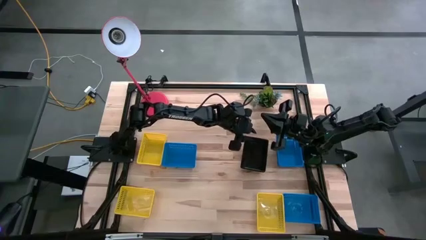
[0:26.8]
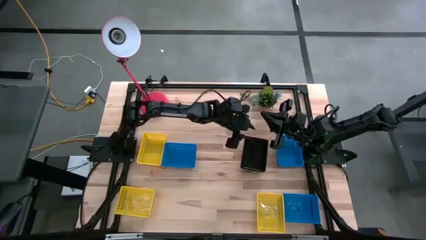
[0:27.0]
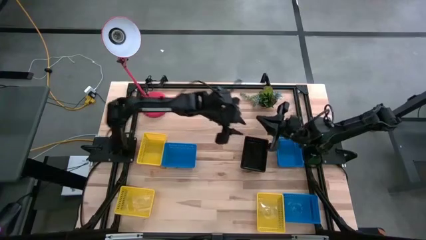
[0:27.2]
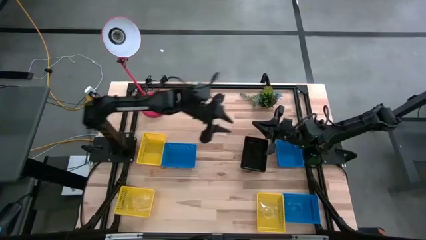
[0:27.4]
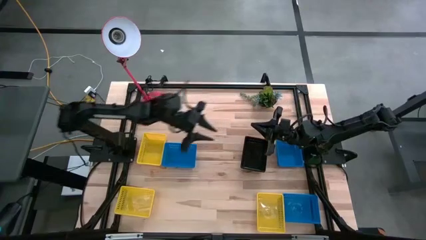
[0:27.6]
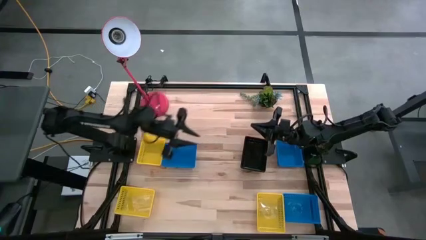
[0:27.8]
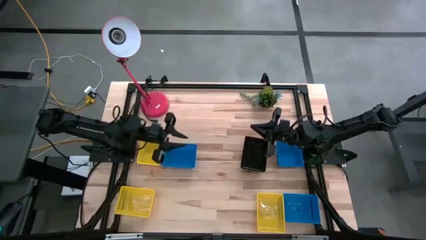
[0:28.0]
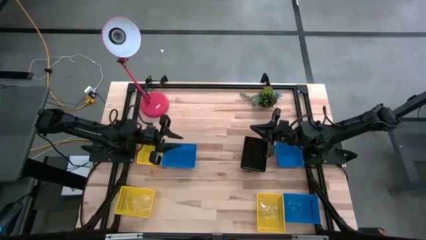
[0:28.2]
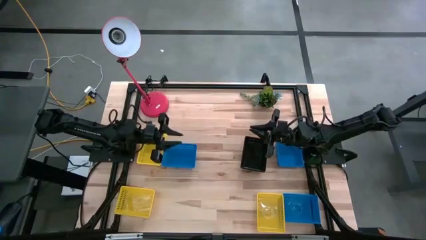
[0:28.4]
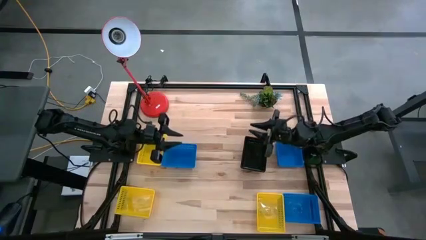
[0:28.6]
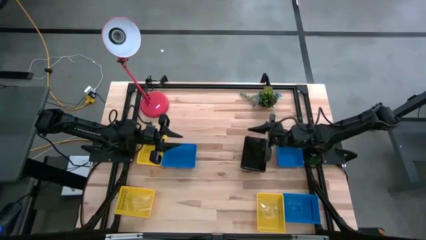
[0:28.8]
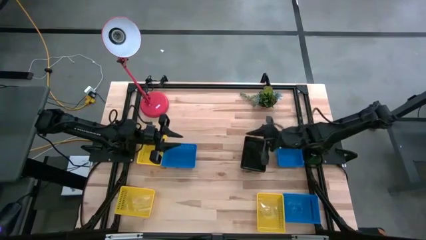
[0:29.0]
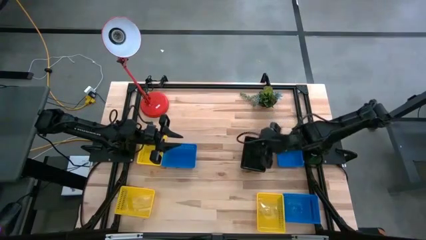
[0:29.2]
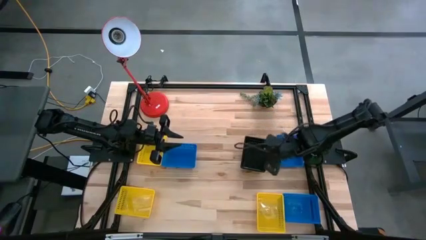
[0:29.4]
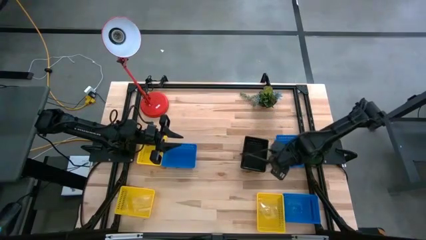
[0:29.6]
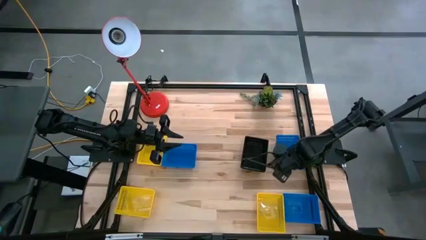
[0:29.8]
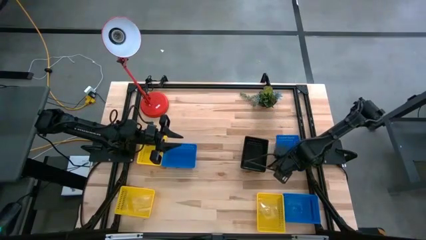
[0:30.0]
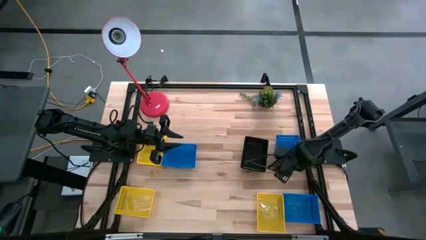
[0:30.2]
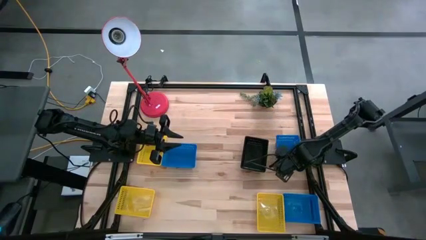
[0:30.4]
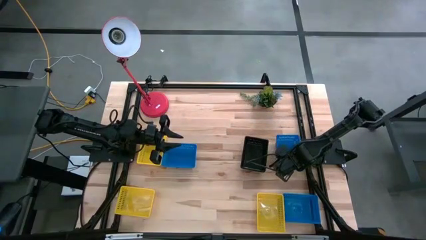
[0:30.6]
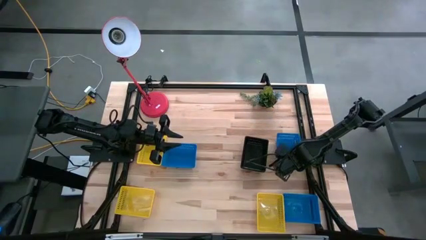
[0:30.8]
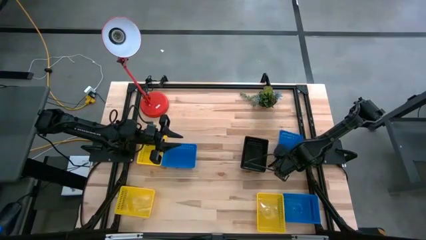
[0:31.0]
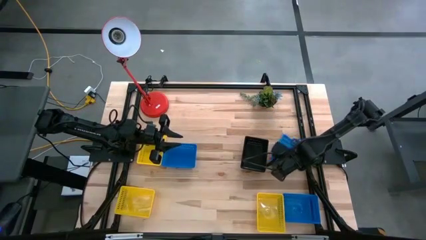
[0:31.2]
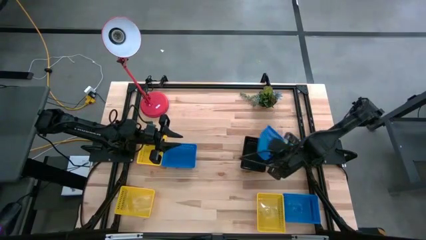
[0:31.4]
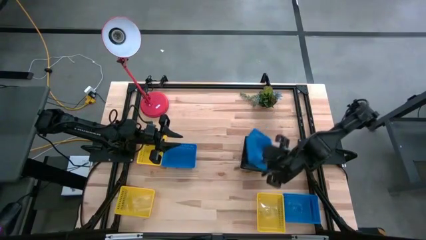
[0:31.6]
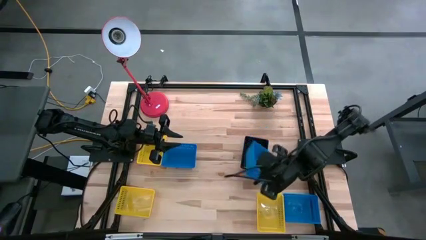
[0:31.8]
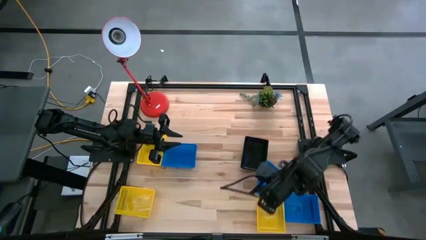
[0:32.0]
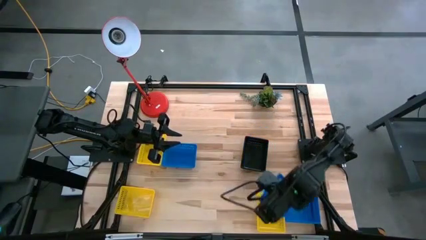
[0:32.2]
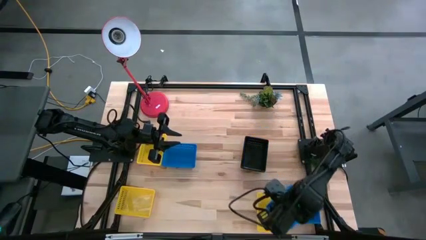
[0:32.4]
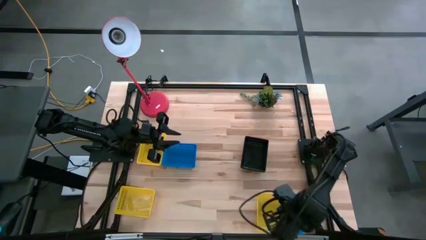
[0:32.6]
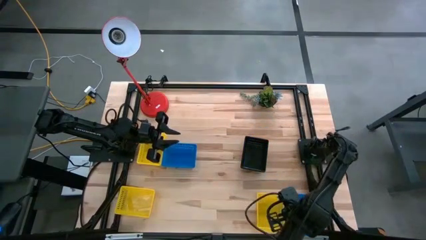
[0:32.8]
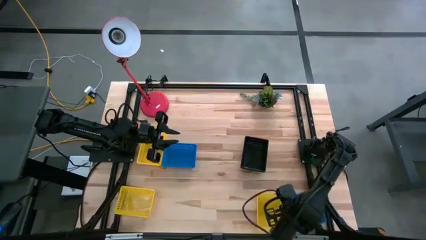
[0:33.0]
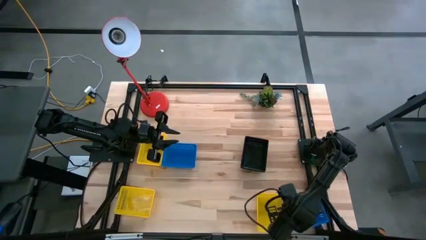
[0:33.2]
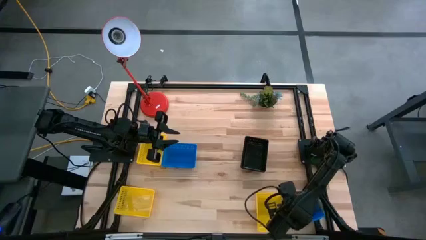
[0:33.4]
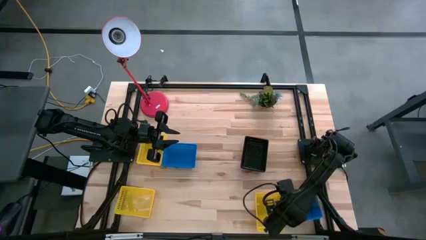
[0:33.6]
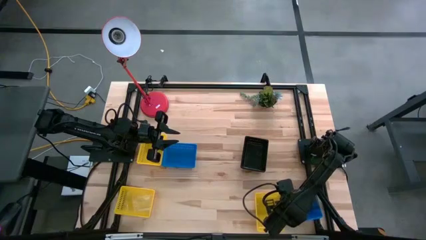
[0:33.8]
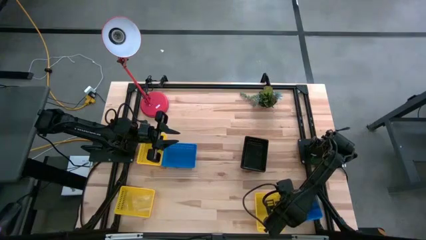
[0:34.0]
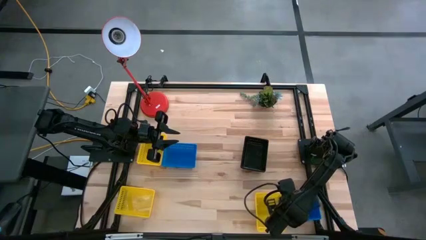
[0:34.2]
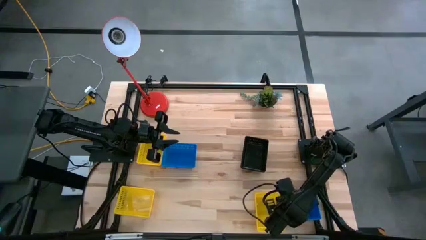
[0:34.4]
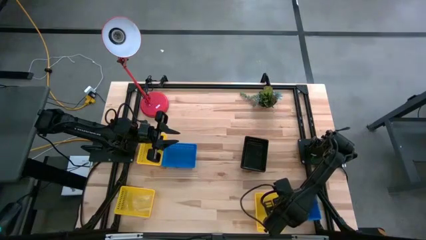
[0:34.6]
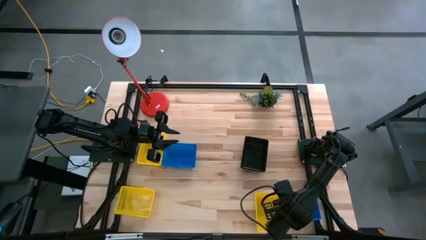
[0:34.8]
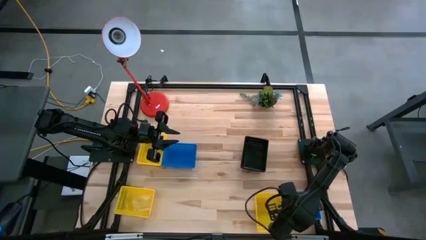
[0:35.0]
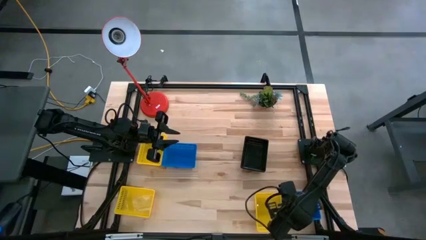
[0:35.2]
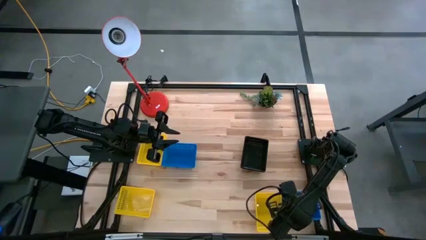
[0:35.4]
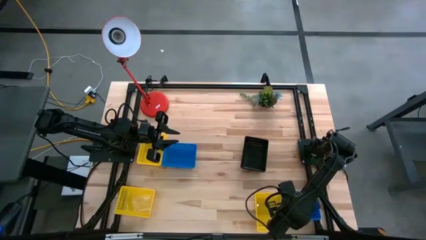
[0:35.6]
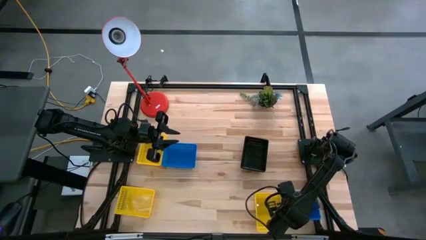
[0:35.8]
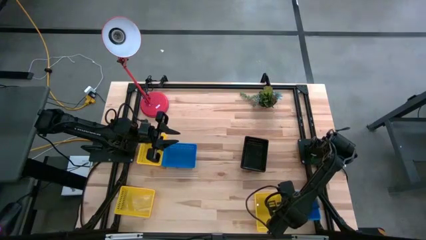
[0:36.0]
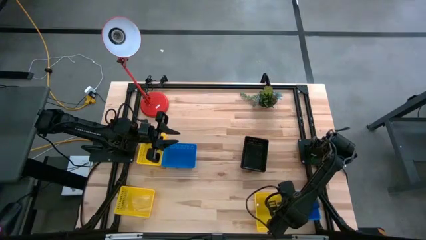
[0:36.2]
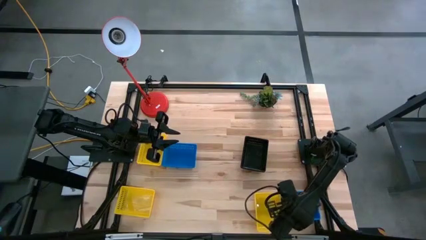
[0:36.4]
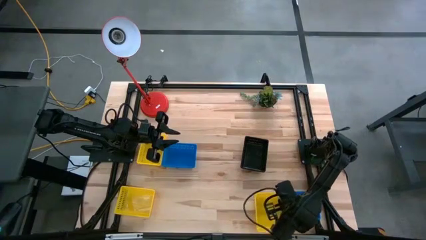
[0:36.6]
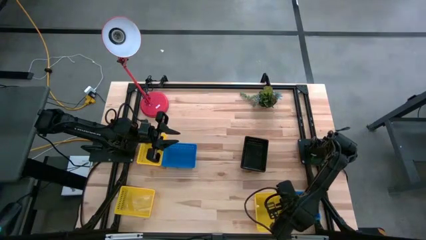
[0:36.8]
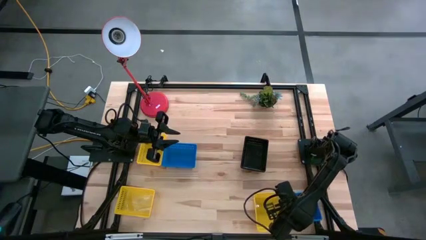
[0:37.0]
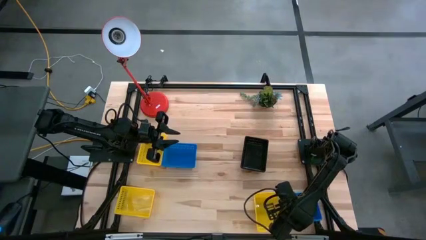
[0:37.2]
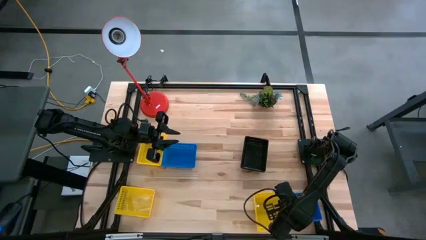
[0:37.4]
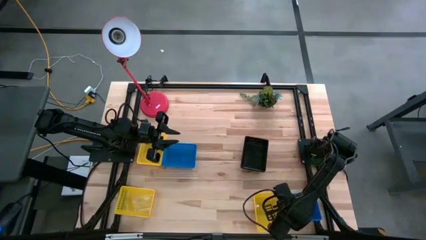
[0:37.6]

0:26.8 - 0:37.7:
Stack the top right blue basket on the bottom right blue basket
